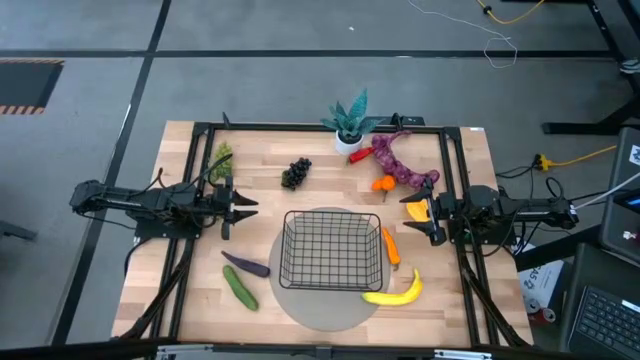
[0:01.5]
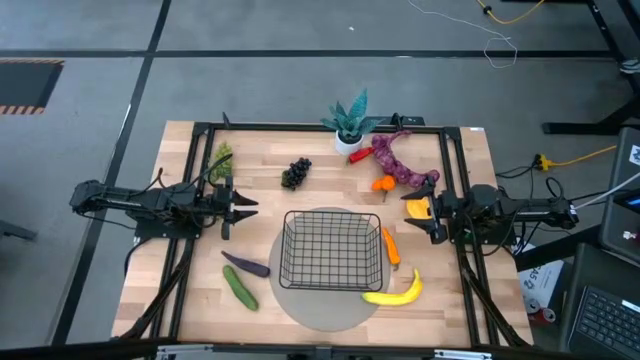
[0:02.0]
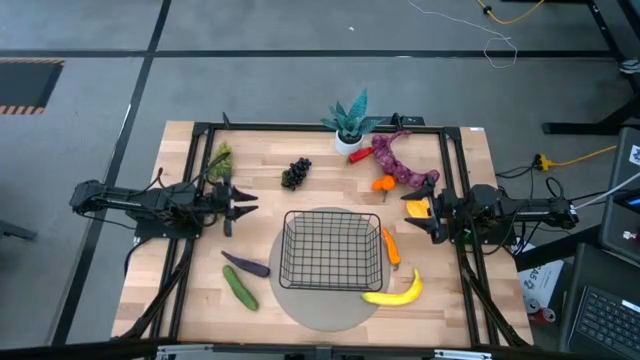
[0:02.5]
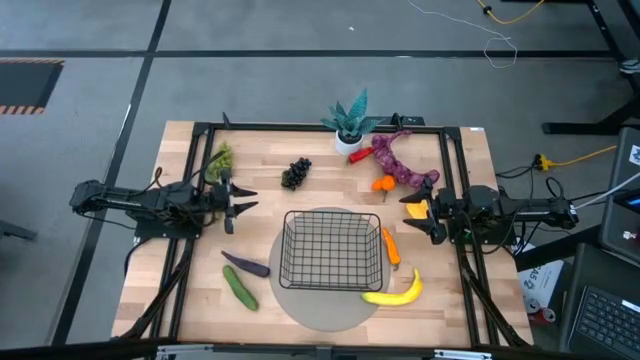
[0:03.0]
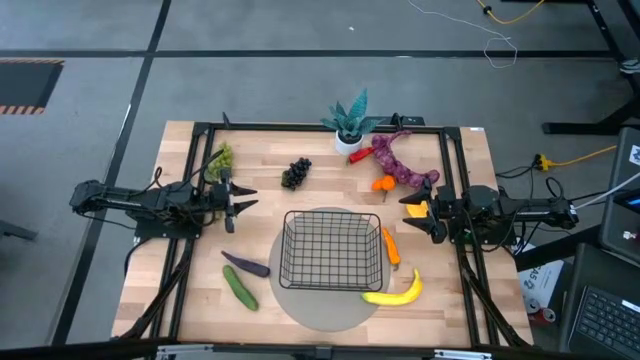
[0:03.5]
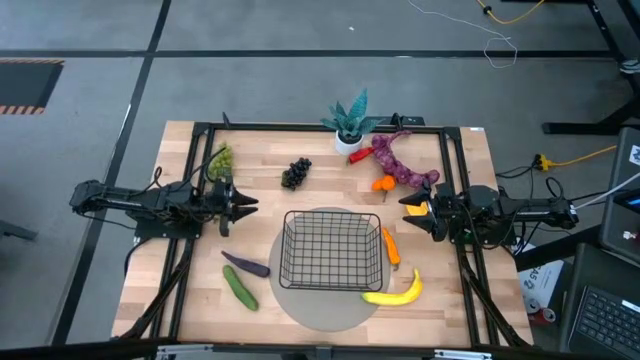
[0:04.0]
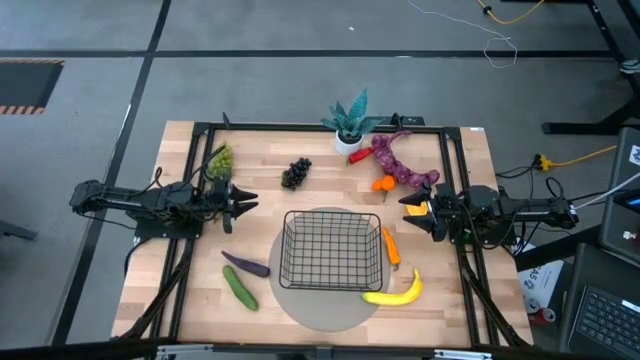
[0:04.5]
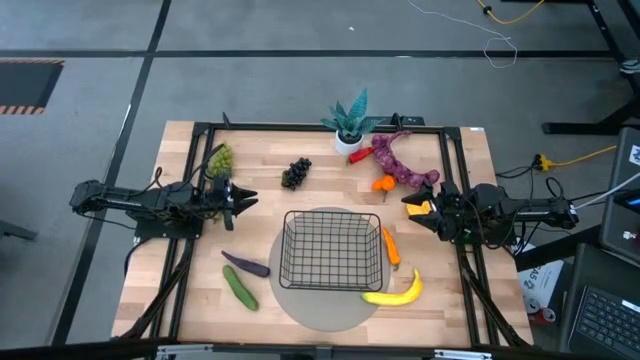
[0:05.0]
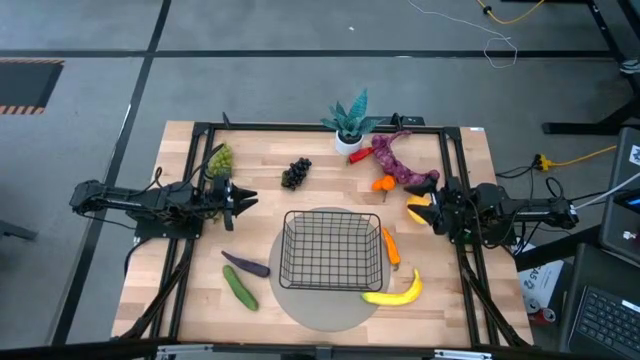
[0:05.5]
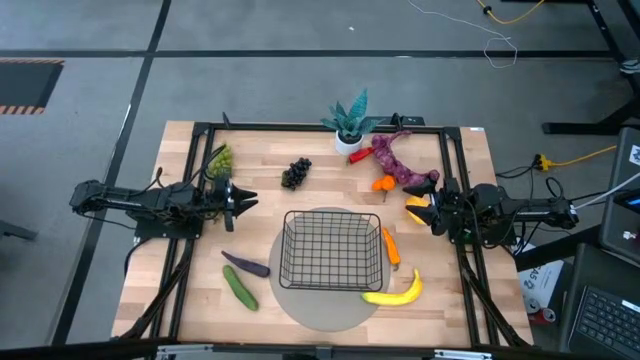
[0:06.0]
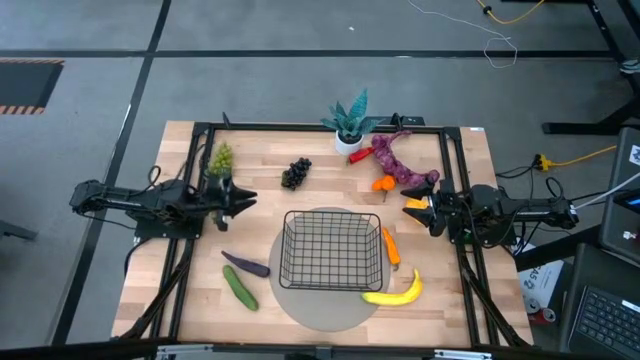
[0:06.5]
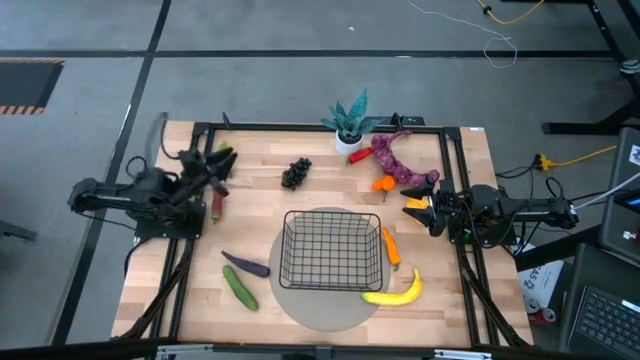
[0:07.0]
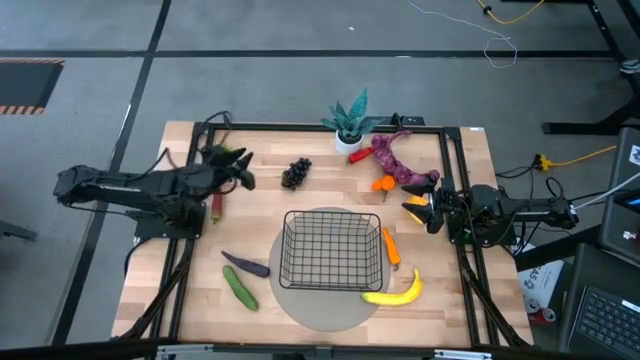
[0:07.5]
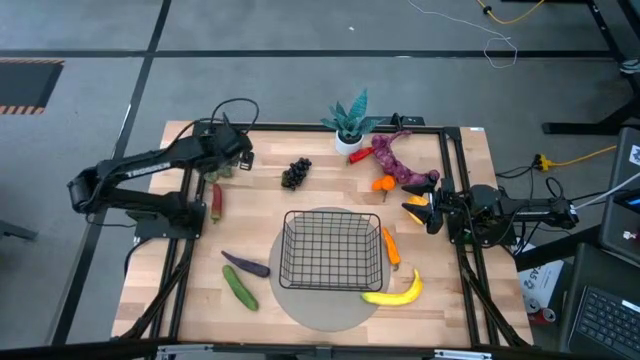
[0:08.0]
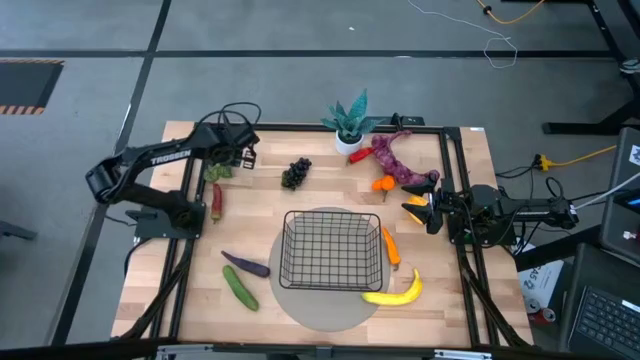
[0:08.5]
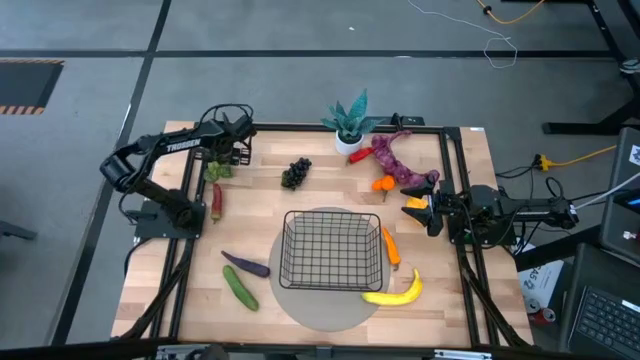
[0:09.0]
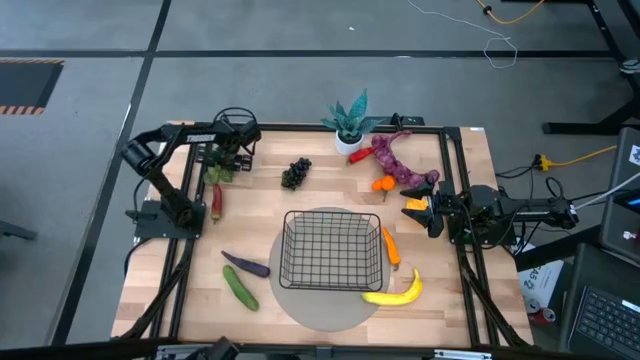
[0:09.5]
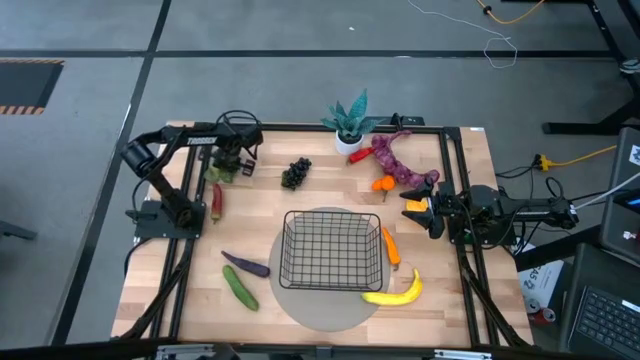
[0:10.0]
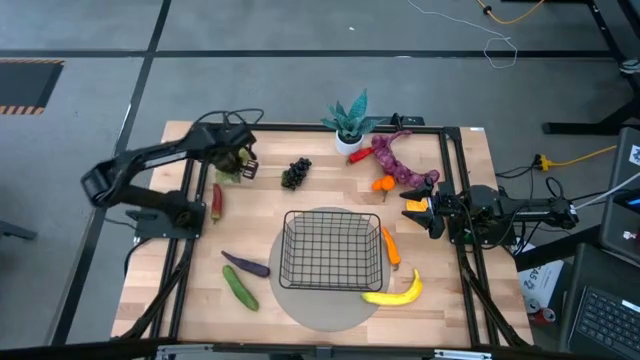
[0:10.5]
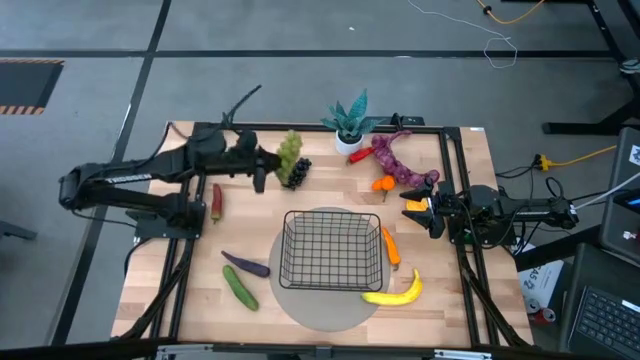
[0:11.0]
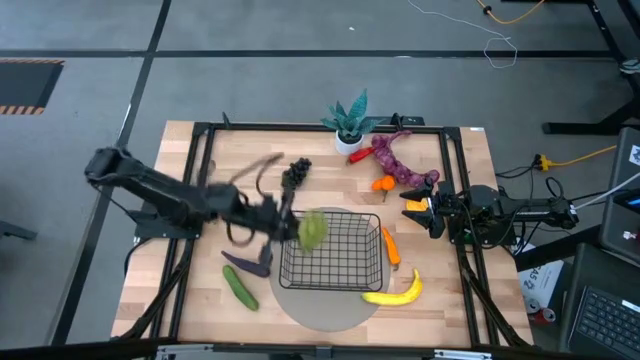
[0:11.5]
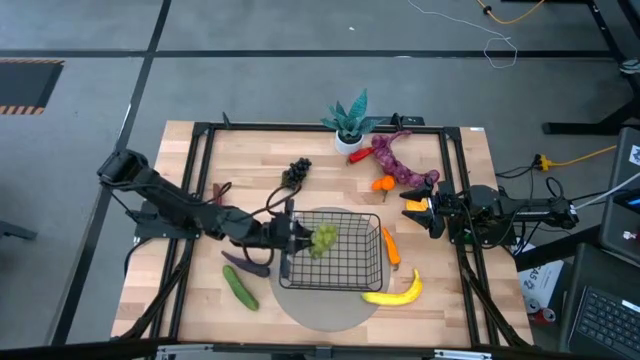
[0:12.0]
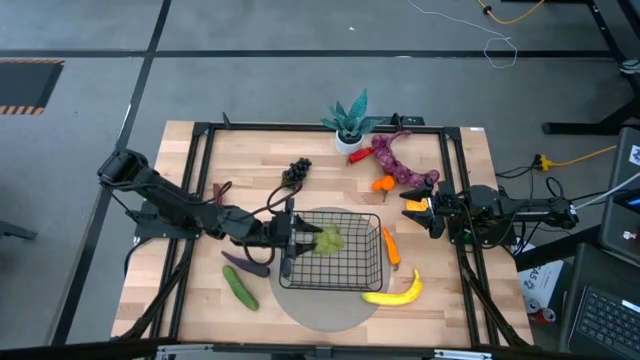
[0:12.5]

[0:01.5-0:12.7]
Task: Build produce basket
Put the green grapes into the black wire basket

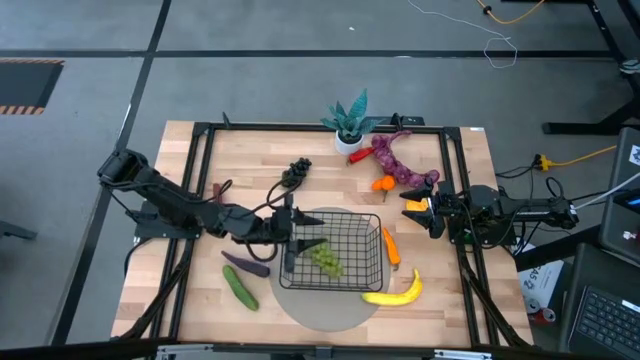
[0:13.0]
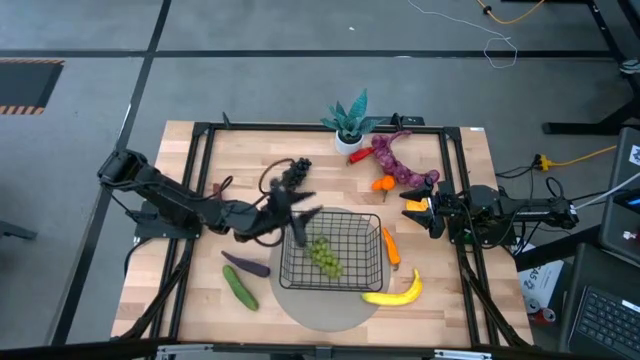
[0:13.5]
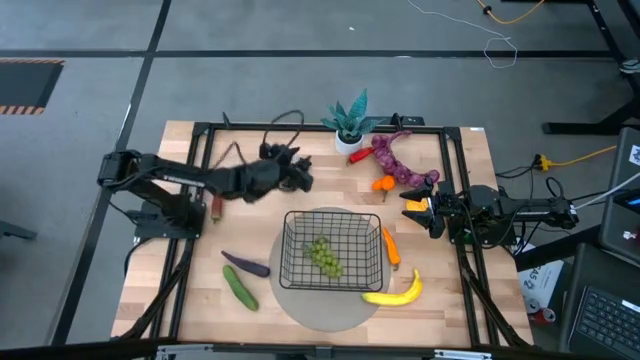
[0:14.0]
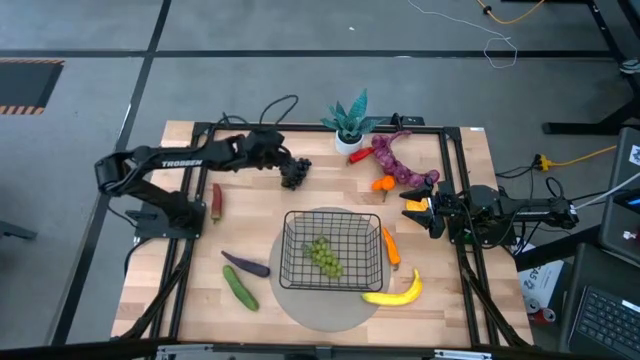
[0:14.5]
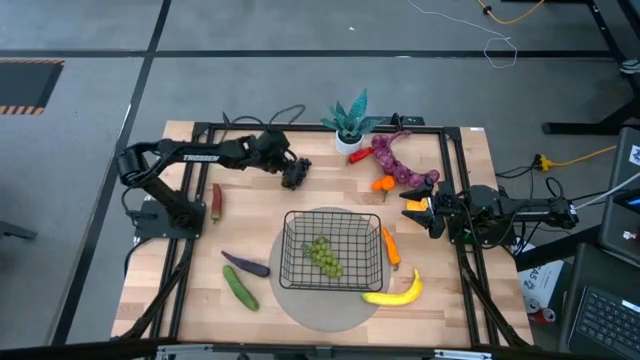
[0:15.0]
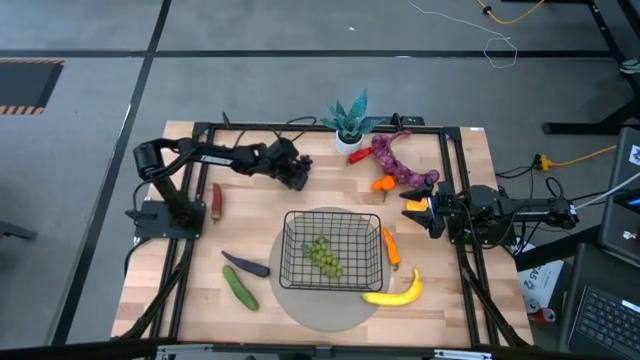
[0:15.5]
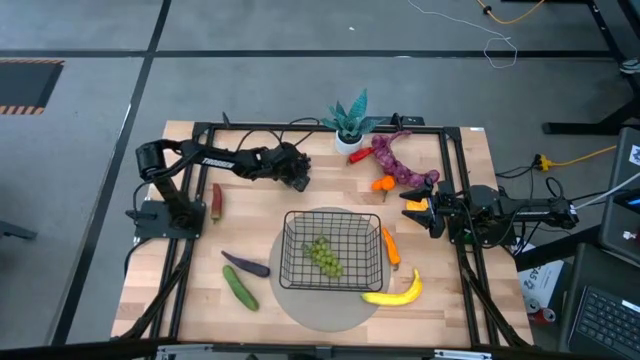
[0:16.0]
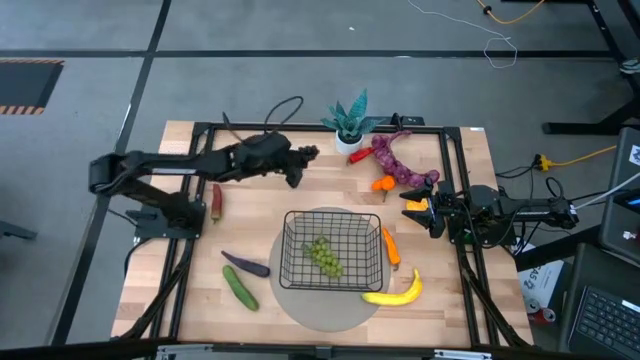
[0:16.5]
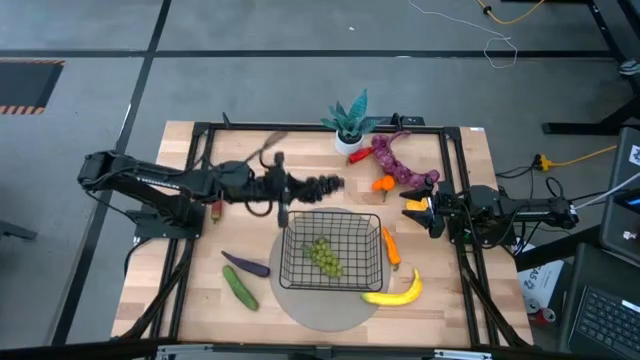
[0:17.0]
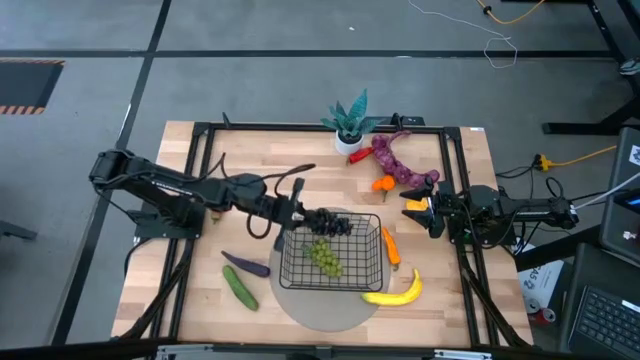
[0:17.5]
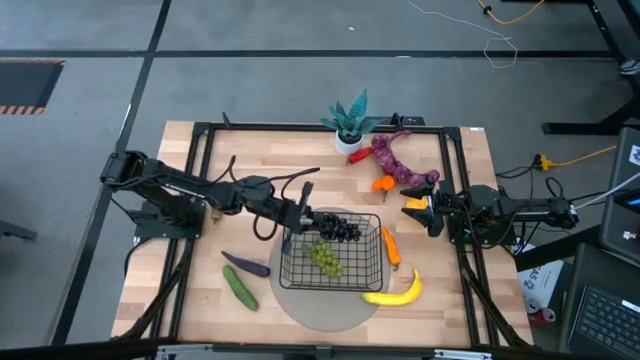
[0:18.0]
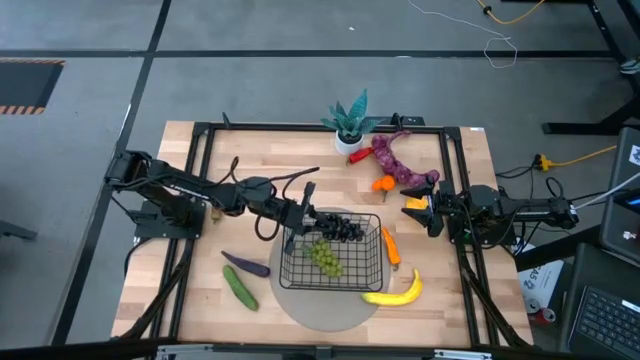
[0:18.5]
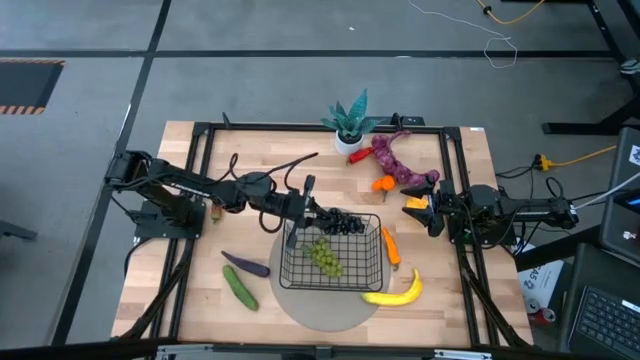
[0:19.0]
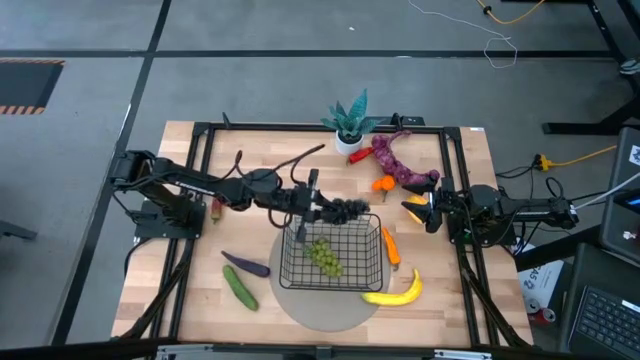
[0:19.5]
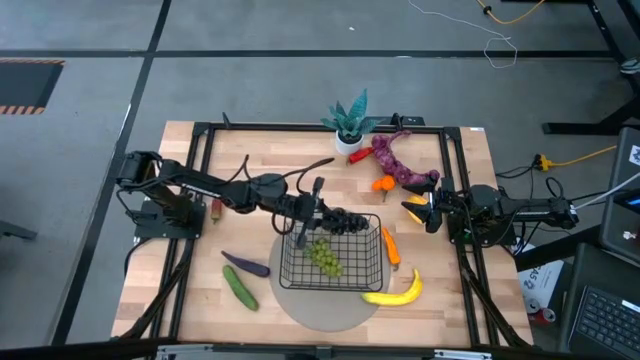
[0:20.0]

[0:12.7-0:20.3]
Put the black grapes into the black wire basket

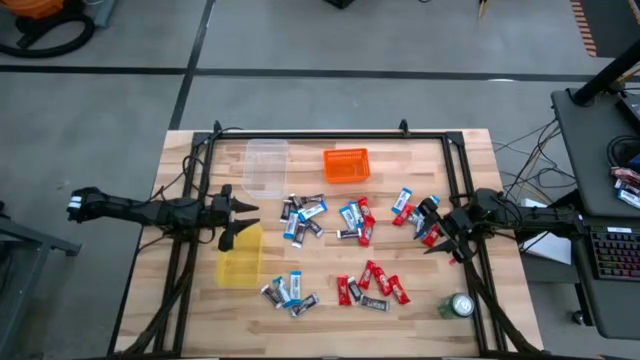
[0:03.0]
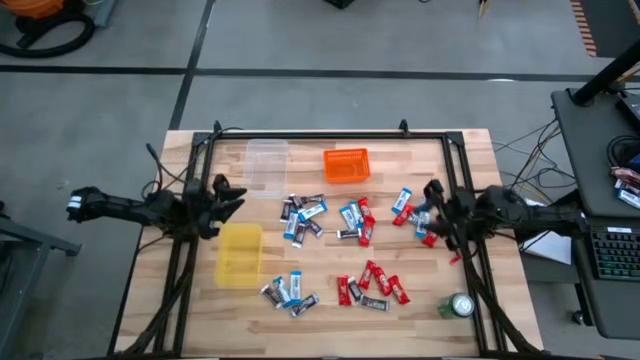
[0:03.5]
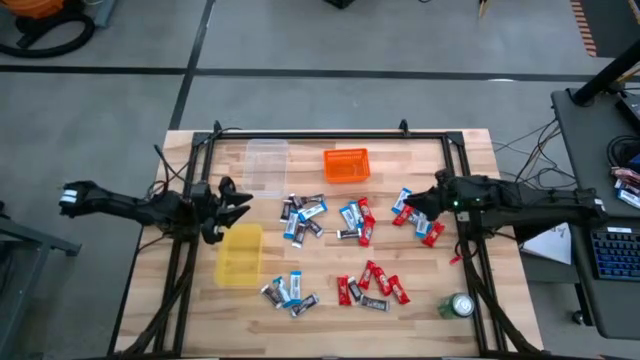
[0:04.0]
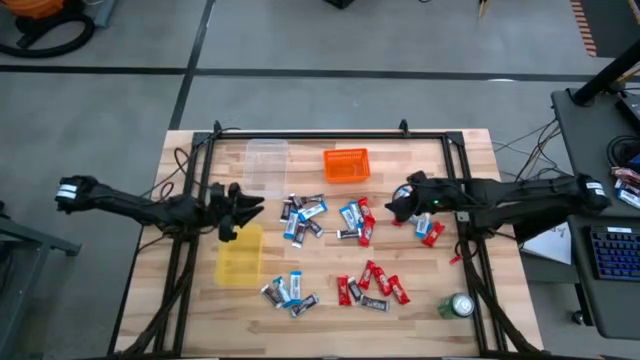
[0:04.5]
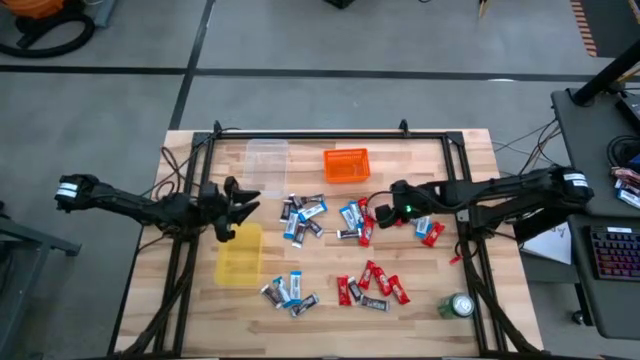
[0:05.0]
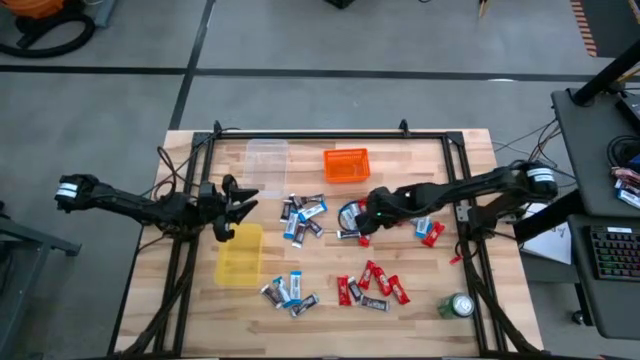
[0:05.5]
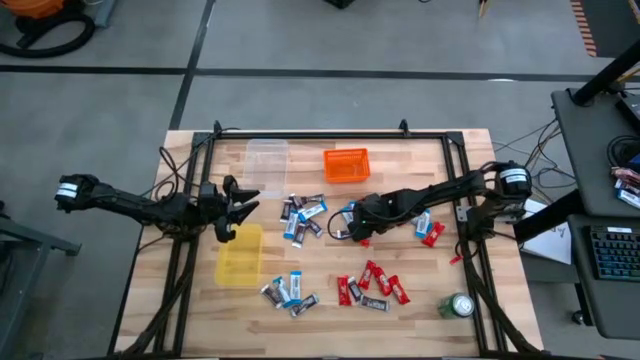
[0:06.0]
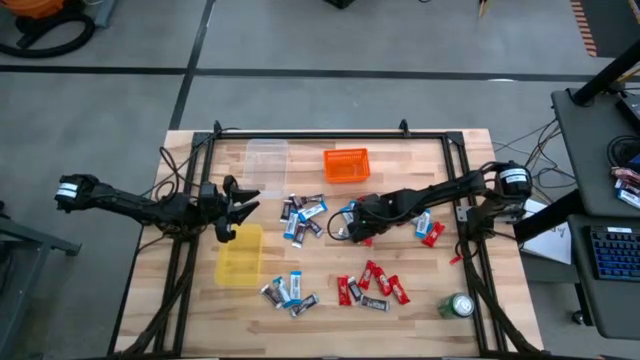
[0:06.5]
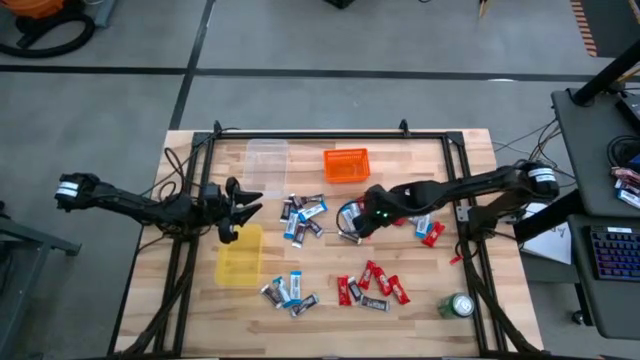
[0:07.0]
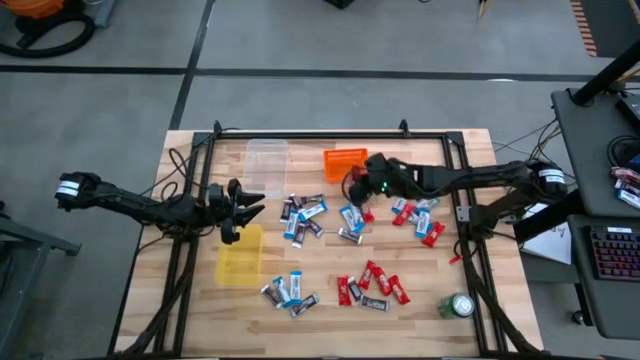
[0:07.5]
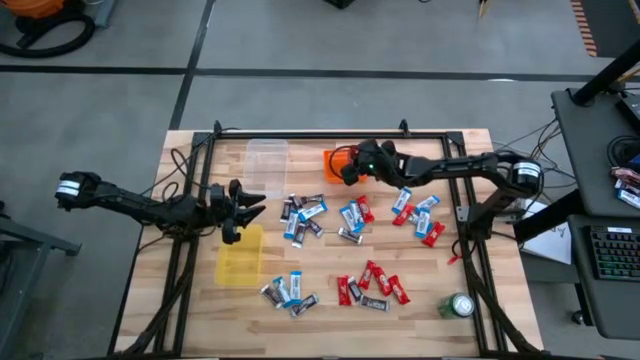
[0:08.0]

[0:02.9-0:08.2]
Task: Sort candy
Put the center red candy into the orange basket
